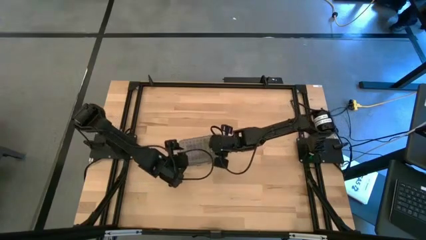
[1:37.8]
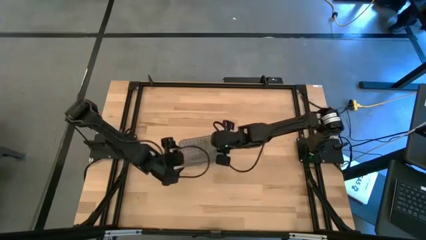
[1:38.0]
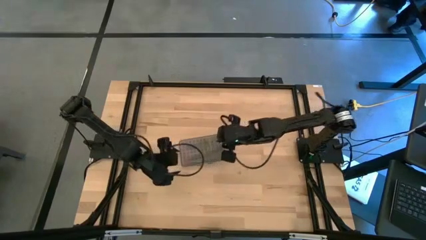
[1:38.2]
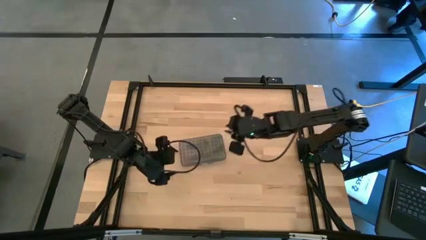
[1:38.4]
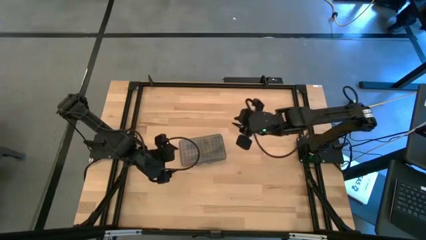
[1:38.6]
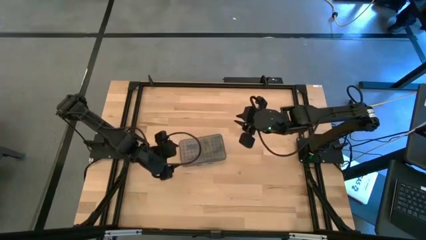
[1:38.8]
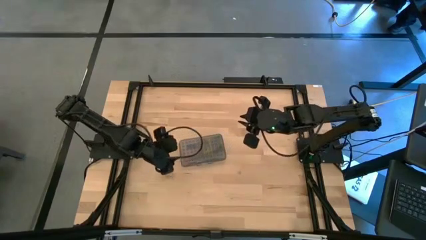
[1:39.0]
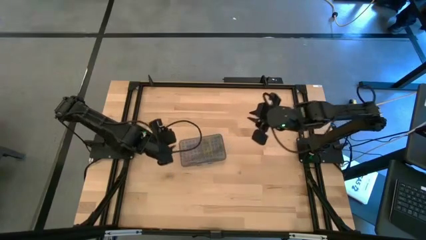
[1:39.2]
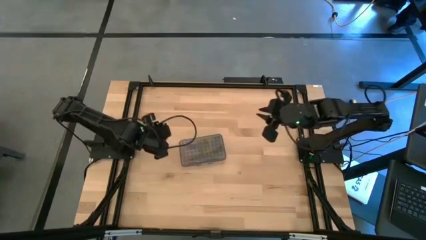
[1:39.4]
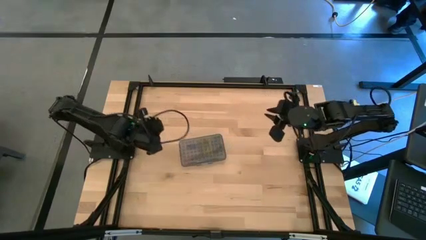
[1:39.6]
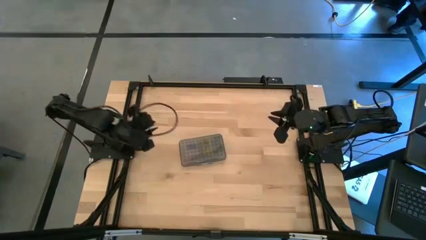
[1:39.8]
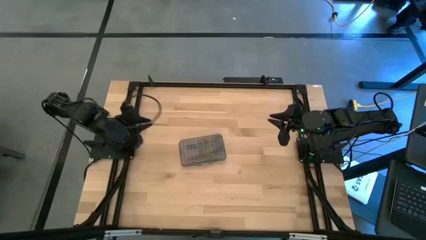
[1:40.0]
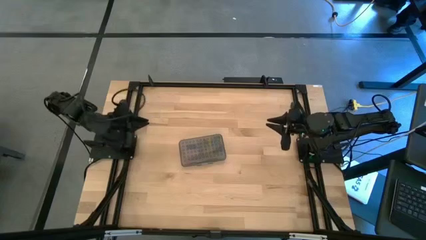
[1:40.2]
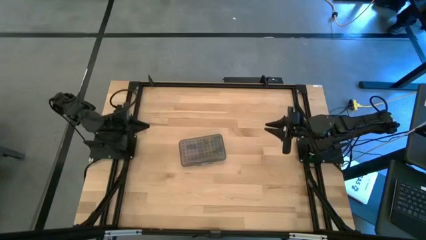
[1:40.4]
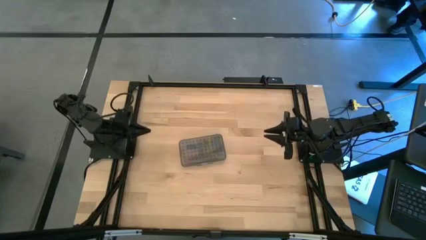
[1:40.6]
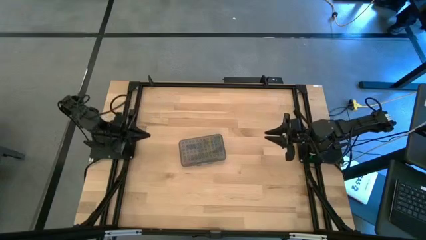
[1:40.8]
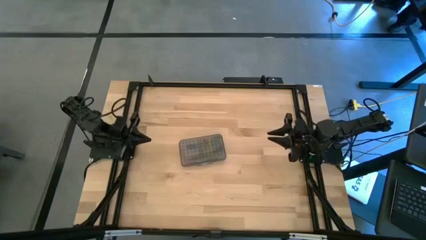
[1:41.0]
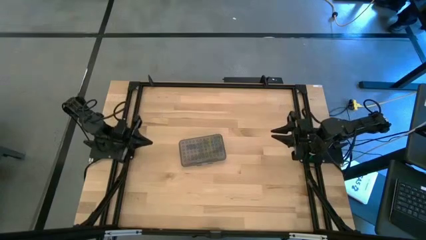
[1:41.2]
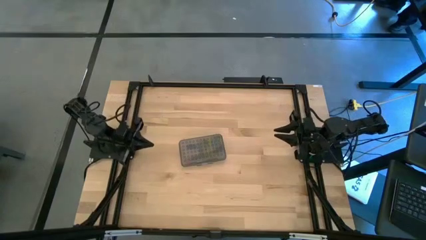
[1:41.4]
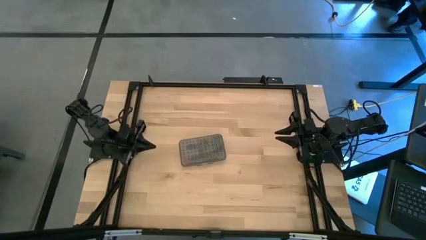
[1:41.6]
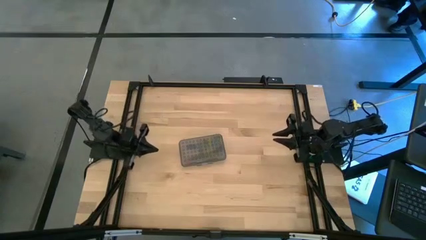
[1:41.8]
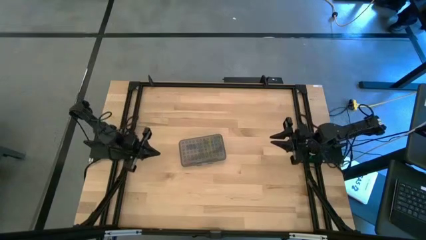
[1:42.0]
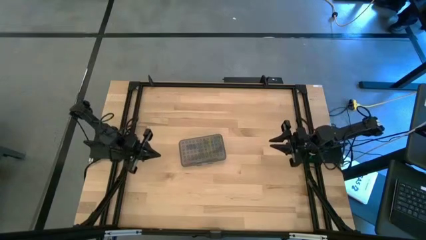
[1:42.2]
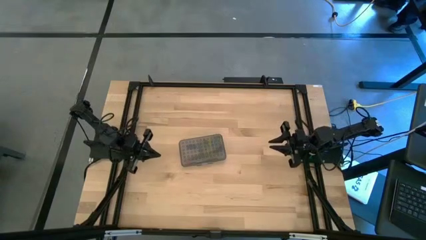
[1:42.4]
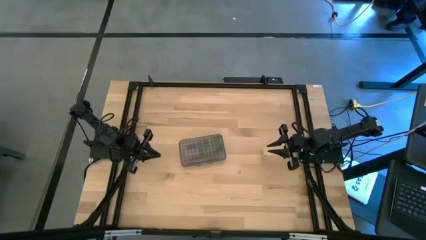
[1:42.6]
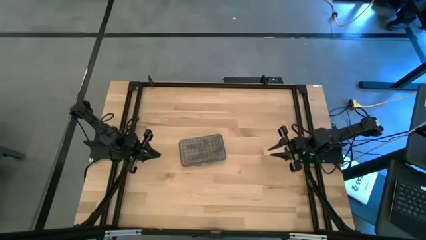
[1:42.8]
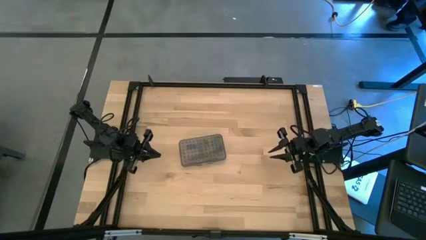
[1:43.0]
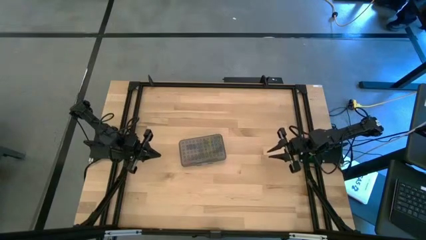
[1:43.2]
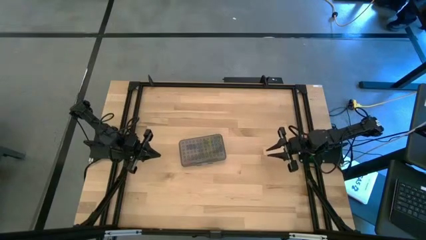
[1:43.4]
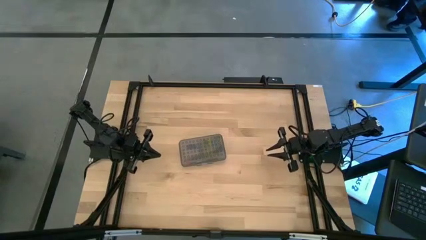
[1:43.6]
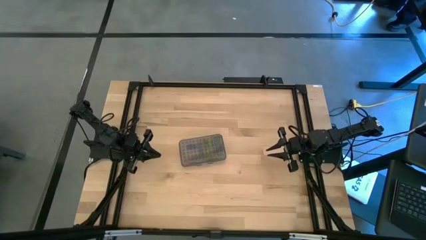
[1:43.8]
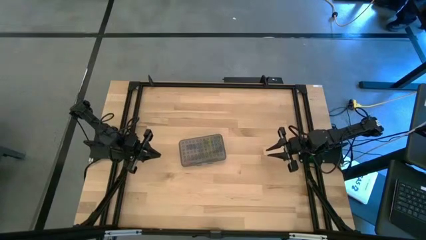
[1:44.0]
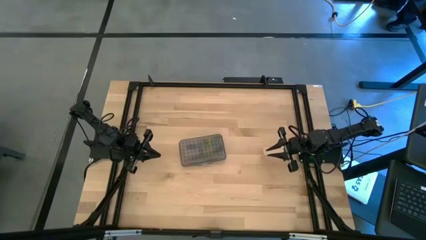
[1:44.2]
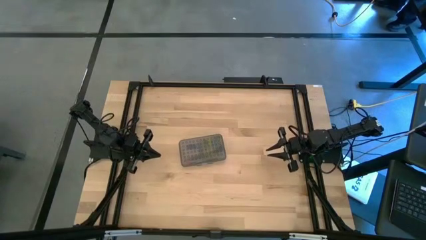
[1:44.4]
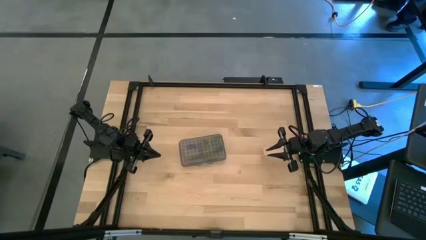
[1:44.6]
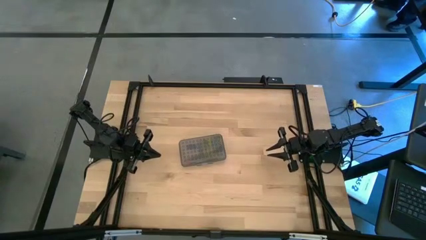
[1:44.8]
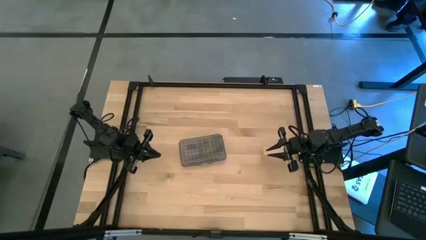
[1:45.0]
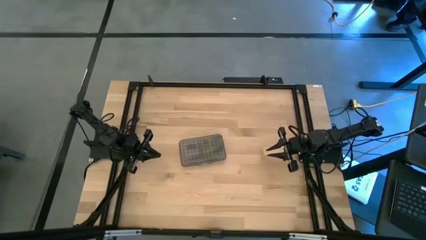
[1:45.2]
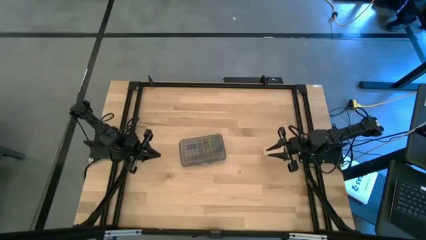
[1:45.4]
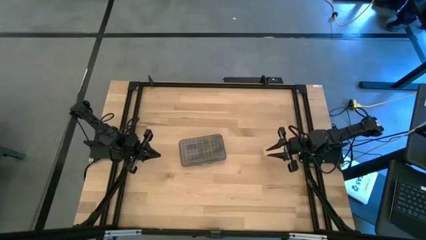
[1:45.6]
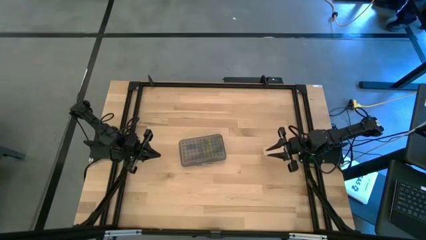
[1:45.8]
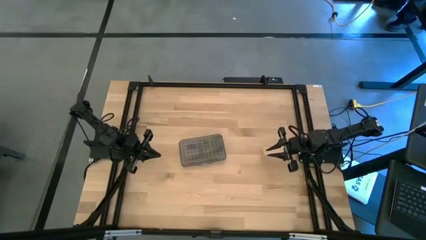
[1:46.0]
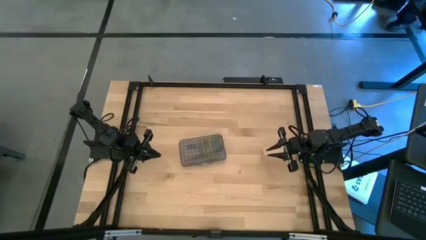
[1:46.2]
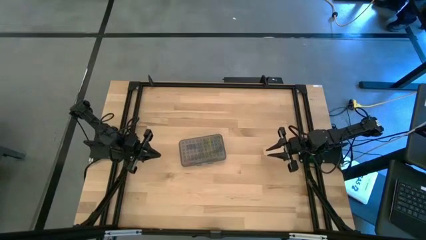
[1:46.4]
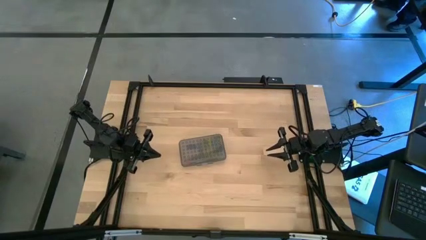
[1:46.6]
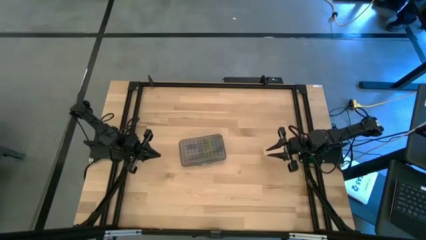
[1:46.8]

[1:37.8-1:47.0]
Task: Pack school essentials
Return to Home Position

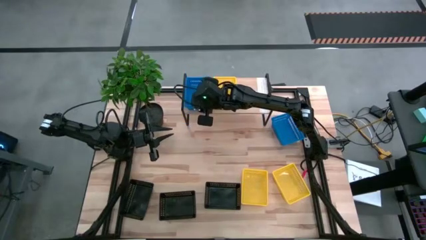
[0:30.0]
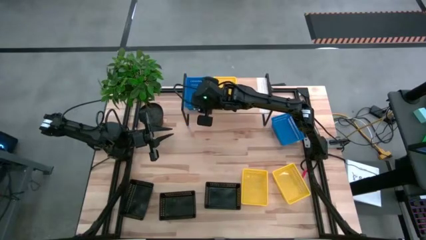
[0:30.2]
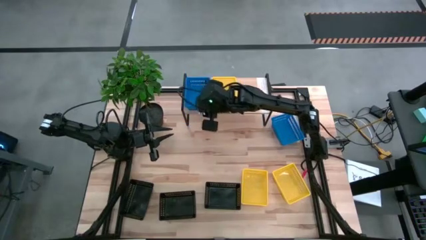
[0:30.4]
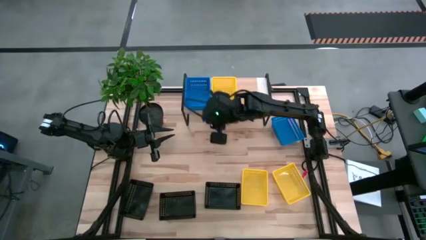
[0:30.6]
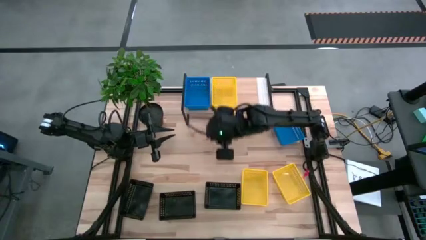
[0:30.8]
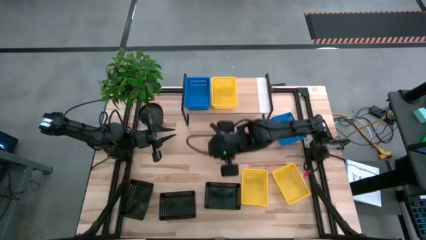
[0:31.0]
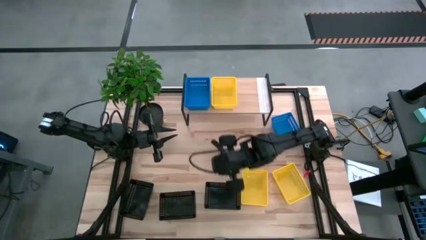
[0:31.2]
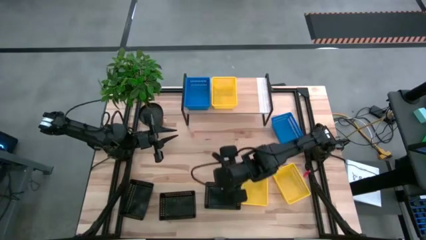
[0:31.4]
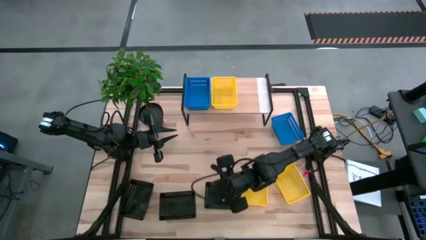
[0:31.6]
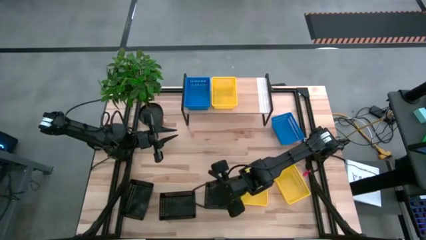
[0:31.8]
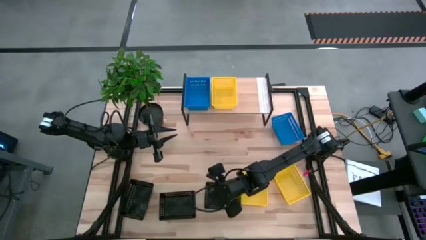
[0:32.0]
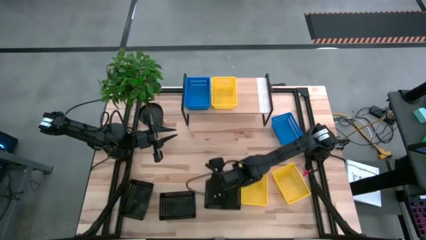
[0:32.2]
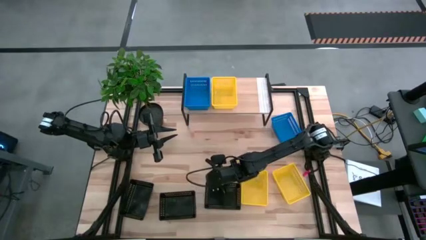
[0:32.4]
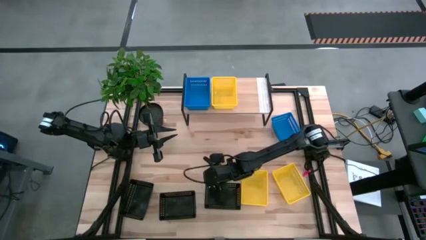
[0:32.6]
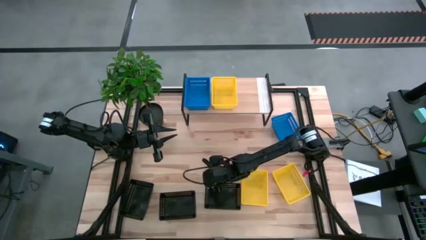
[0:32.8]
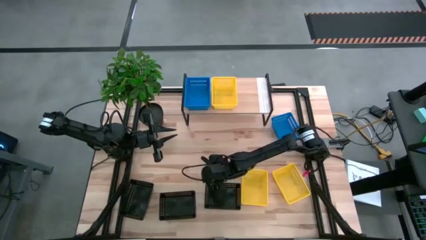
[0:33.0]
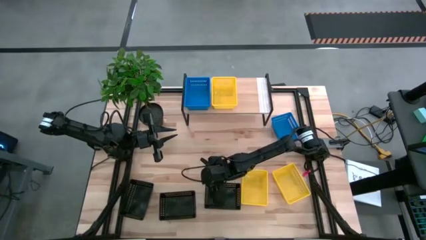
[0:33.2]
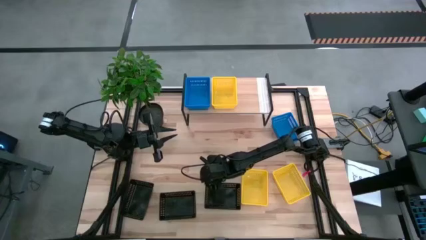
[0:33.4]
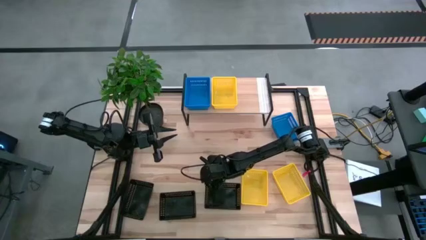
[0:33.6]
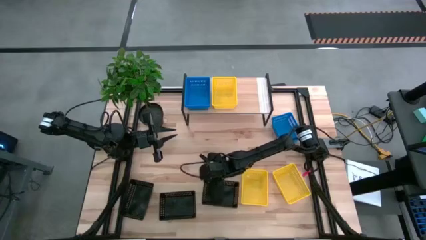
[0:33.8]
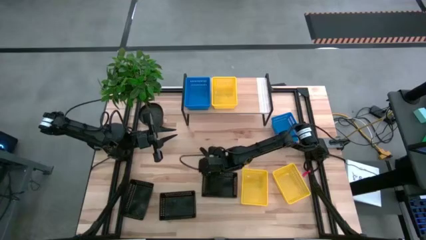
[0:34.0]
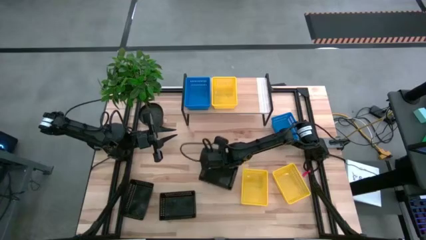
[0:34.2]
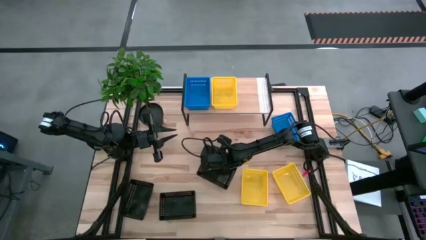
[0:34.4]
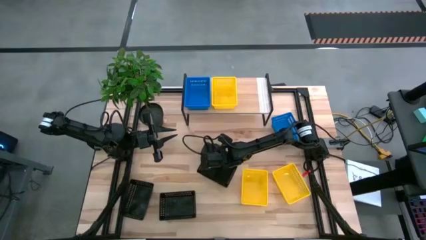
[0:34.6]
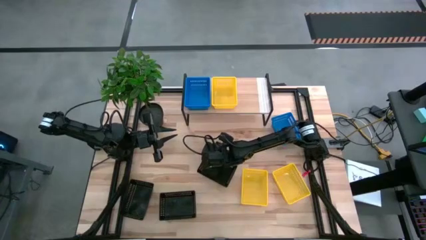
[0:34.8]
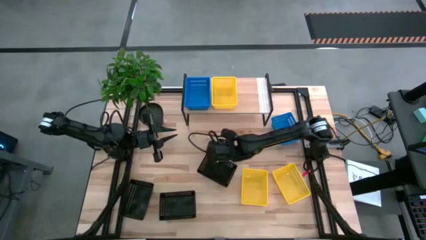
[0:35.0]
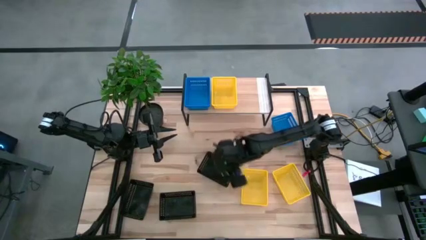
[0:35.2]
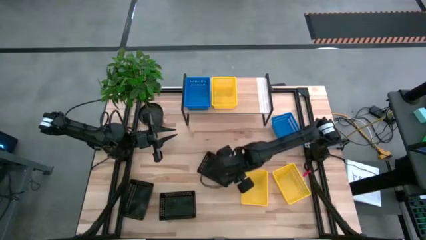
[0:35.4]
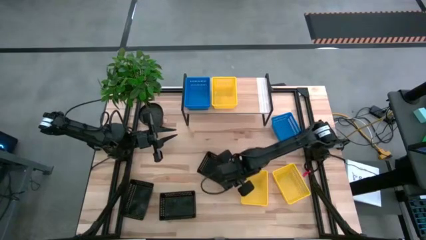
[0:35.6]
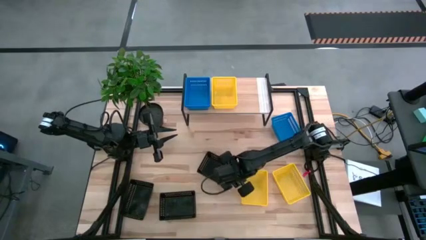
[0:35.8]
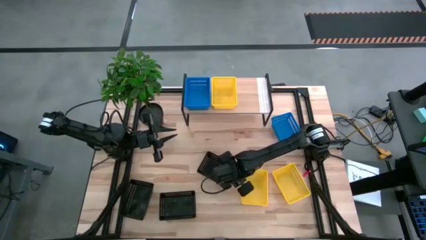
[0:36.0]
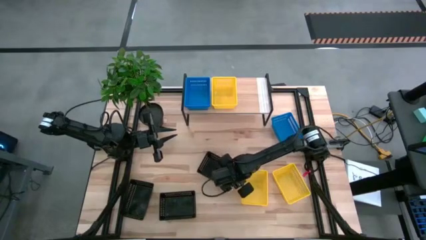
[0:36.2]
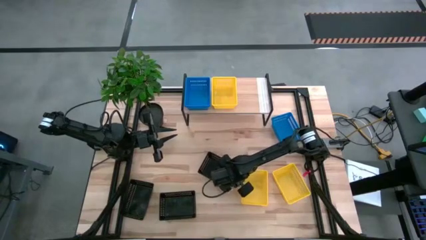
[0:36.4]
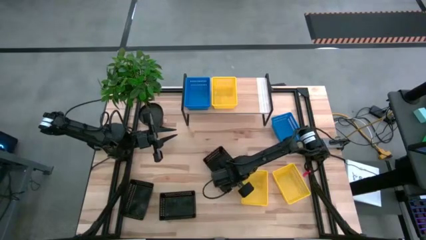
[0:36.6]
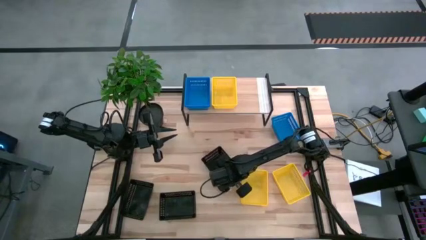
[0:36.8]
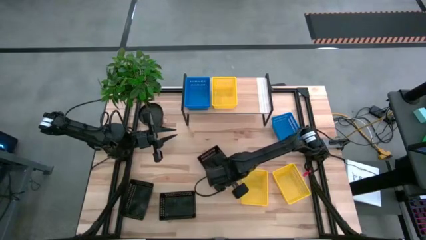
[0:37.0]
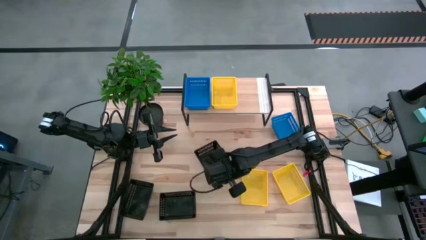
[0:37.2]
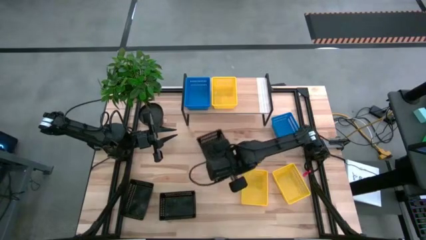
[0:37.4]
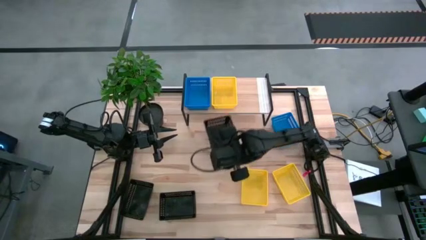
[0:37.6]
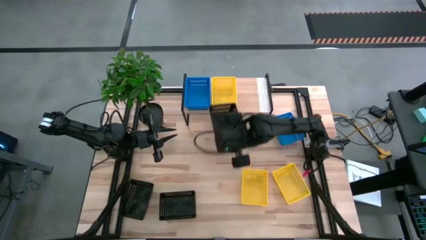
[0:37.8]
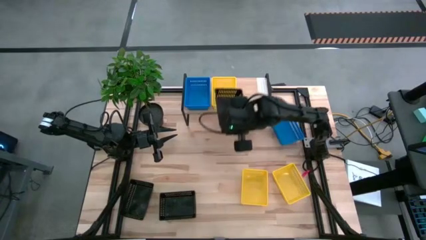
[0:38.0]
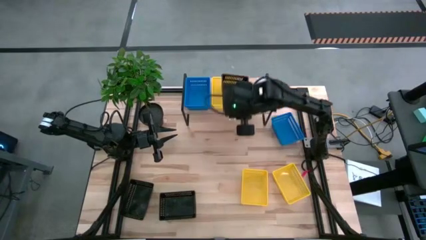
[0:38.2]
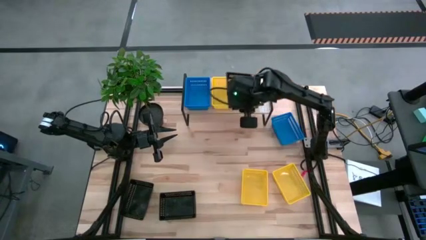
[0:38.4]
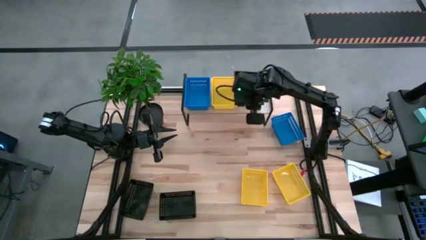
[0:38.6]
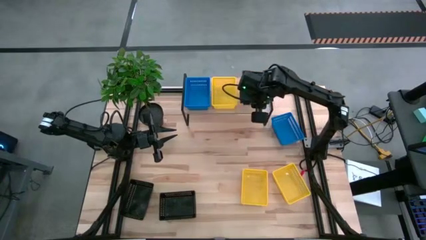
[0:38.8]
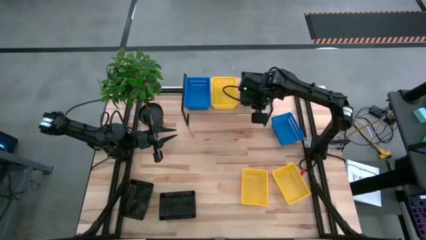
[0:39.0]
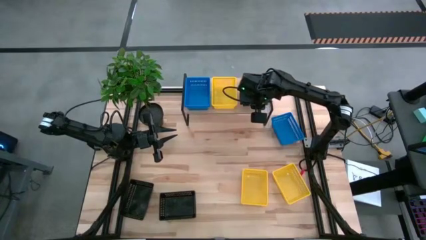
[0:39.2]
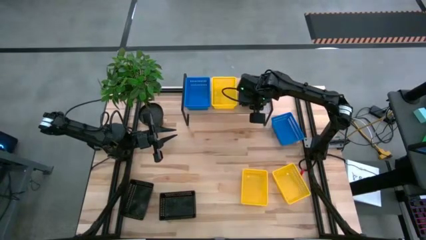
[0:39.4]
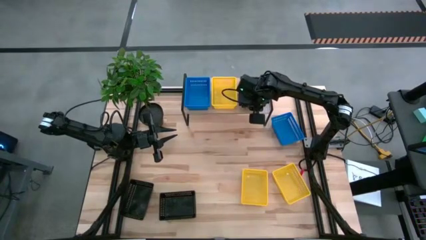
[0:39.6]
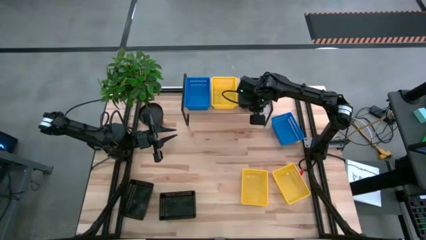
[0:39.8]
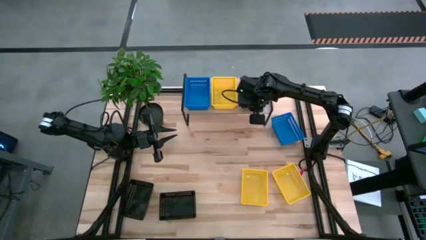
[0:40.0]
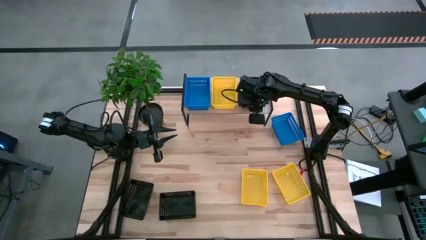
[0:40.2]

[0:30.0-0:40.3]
Task: Stack baskets on shelf by color
Put the right black bin on the shelf
